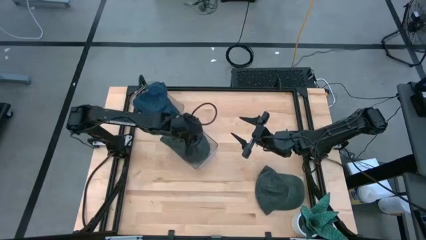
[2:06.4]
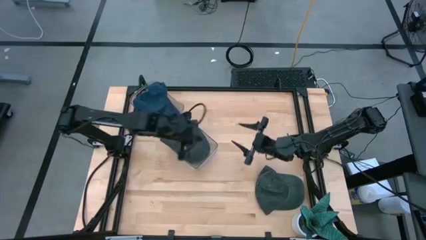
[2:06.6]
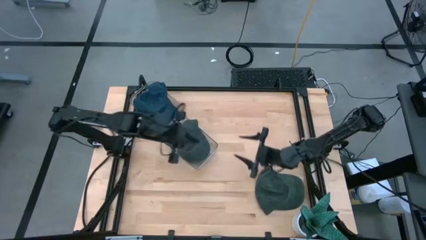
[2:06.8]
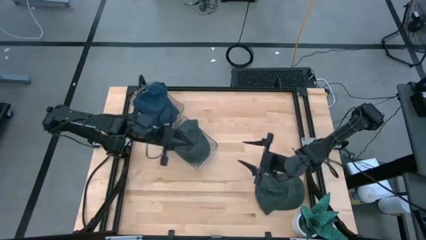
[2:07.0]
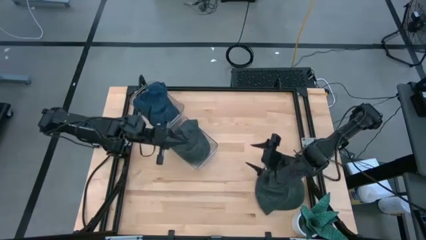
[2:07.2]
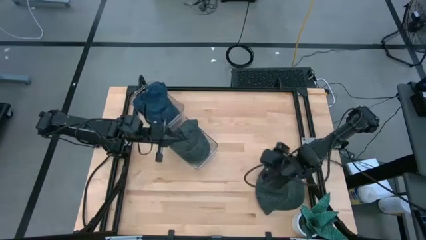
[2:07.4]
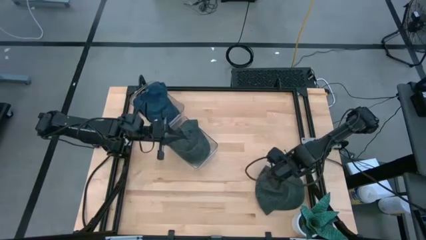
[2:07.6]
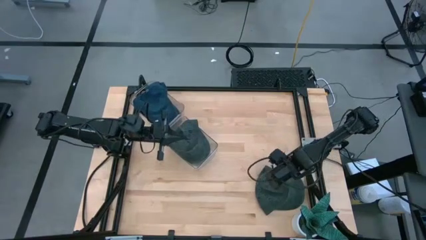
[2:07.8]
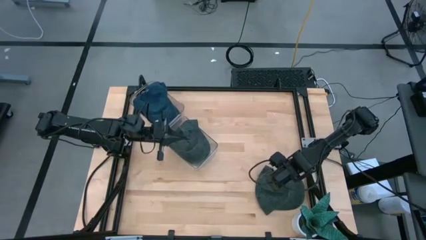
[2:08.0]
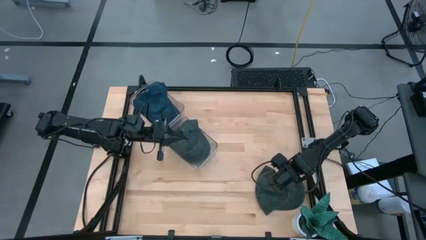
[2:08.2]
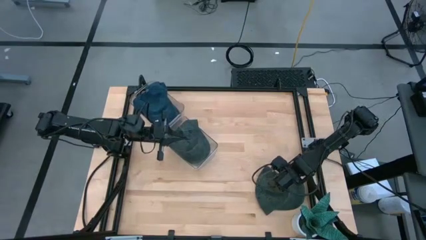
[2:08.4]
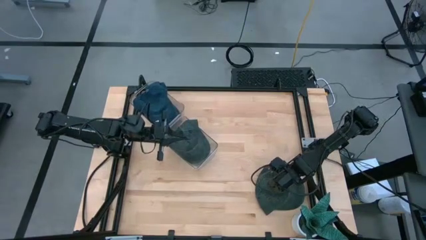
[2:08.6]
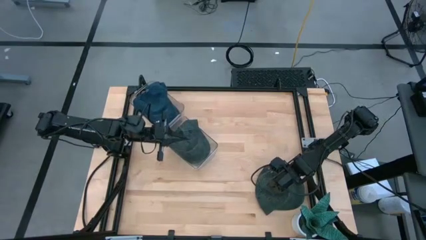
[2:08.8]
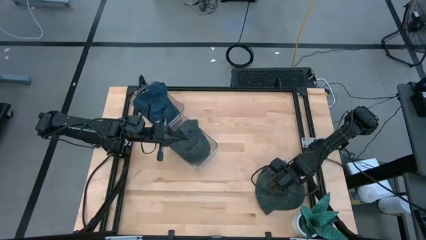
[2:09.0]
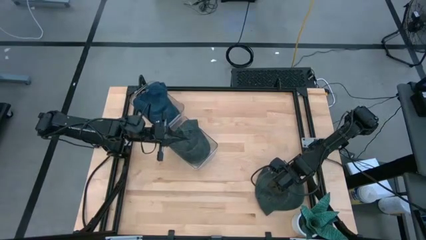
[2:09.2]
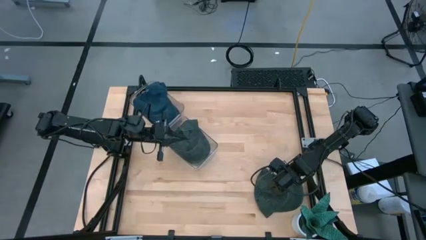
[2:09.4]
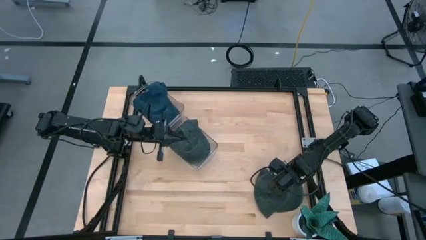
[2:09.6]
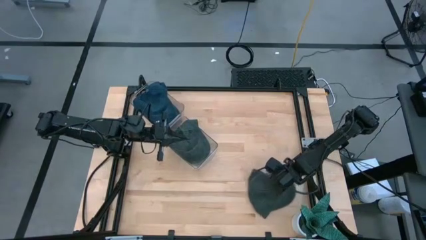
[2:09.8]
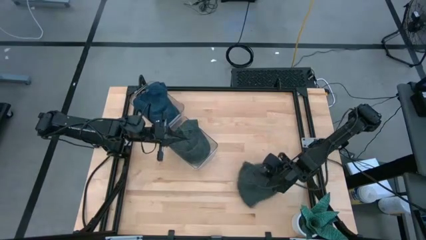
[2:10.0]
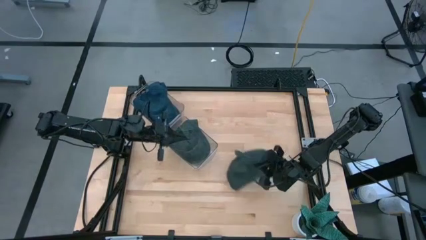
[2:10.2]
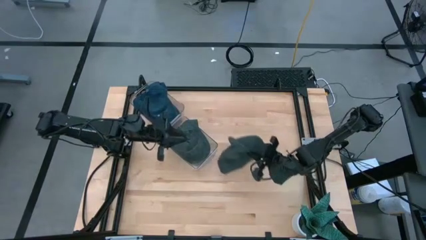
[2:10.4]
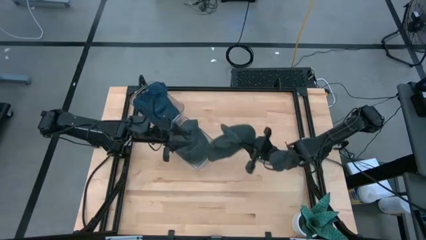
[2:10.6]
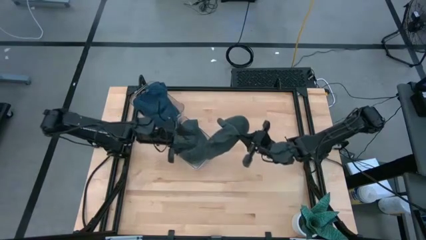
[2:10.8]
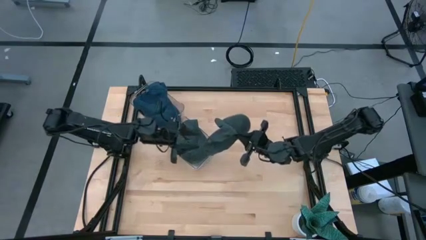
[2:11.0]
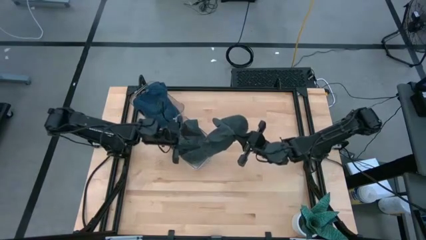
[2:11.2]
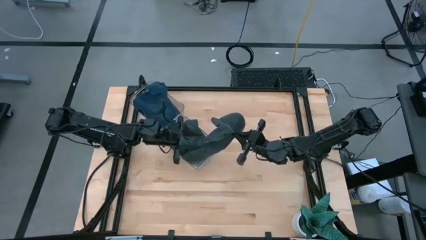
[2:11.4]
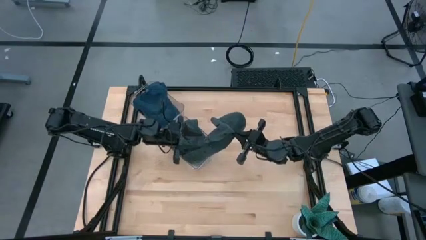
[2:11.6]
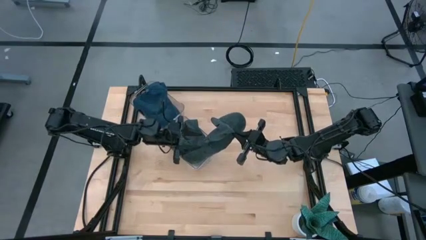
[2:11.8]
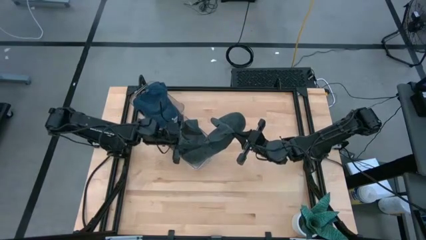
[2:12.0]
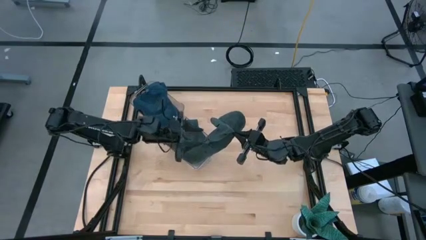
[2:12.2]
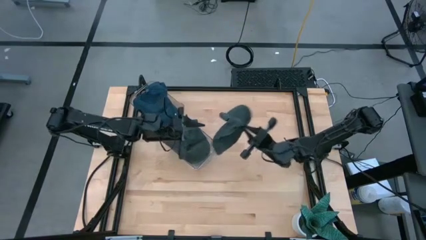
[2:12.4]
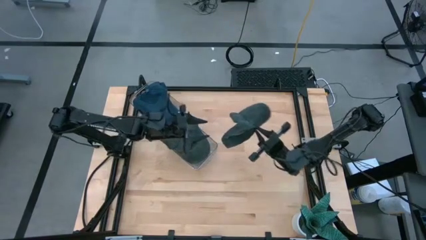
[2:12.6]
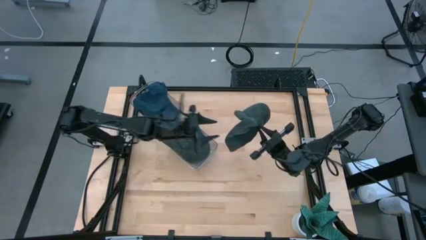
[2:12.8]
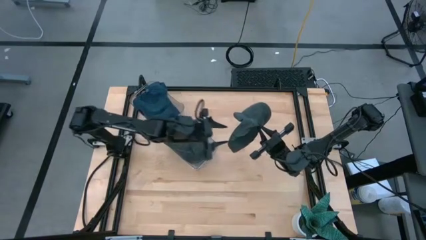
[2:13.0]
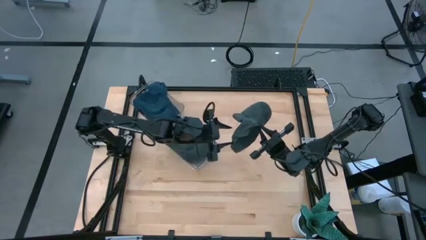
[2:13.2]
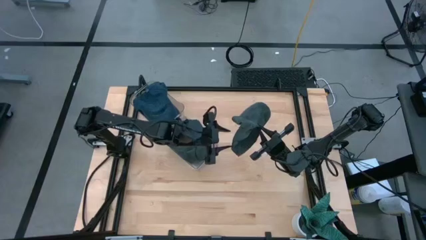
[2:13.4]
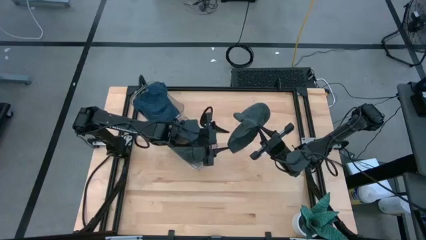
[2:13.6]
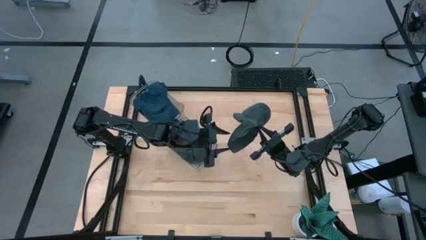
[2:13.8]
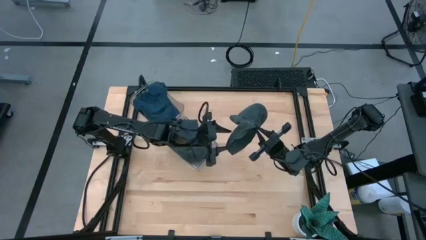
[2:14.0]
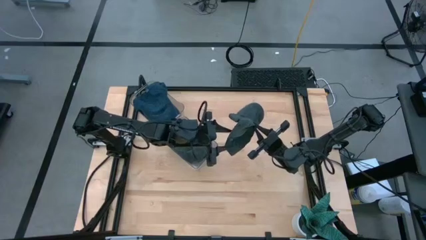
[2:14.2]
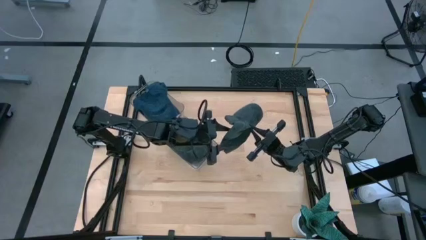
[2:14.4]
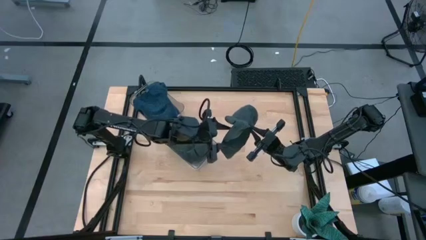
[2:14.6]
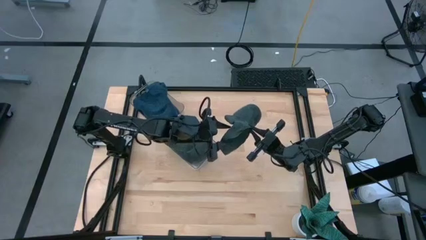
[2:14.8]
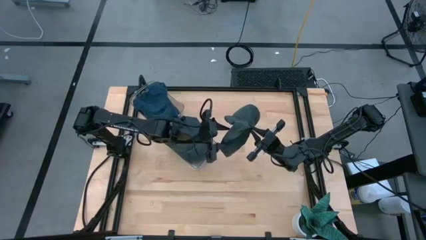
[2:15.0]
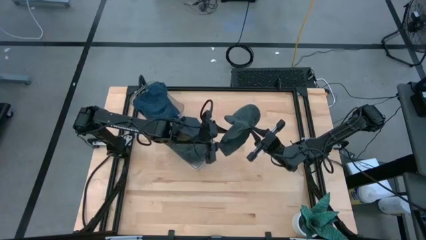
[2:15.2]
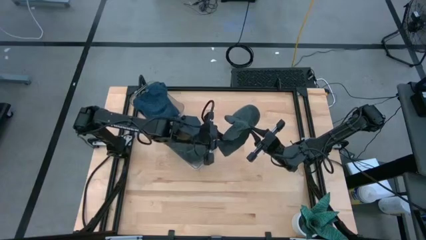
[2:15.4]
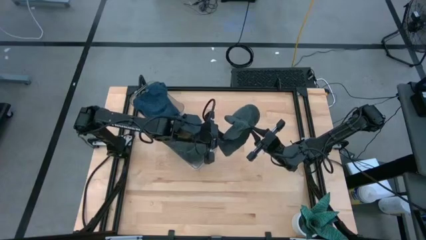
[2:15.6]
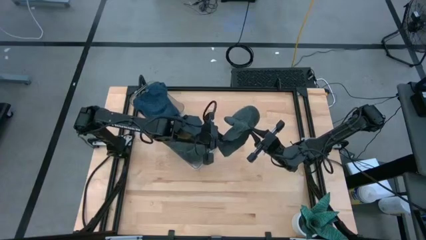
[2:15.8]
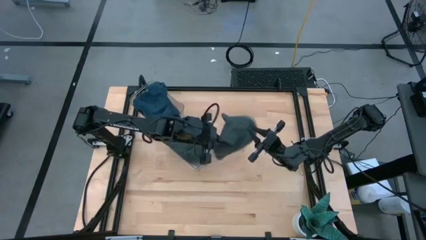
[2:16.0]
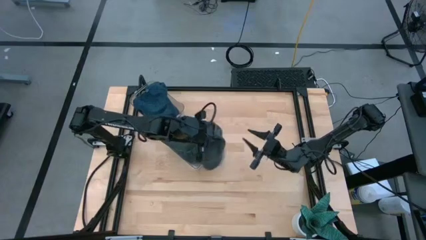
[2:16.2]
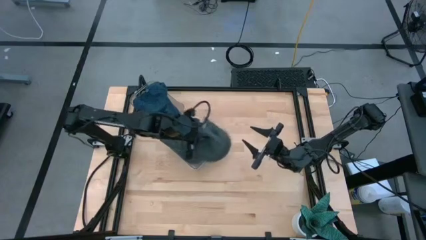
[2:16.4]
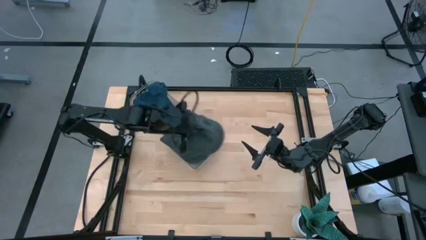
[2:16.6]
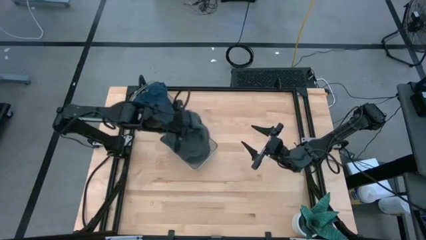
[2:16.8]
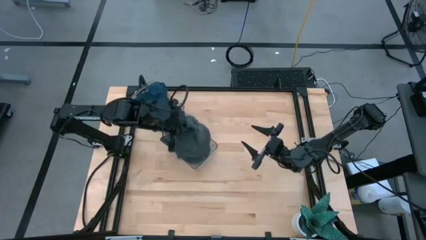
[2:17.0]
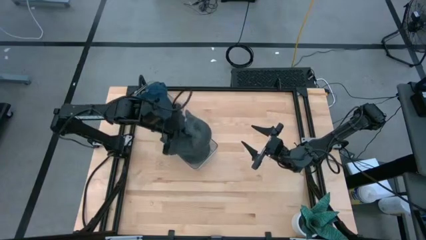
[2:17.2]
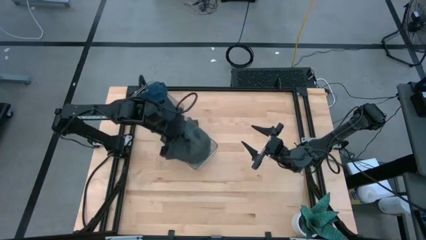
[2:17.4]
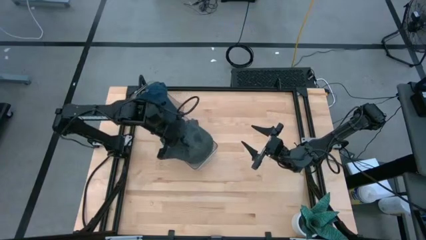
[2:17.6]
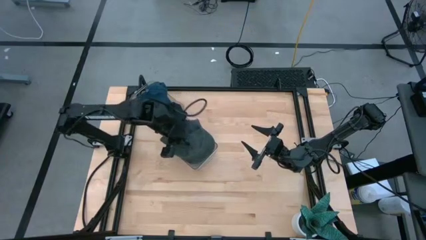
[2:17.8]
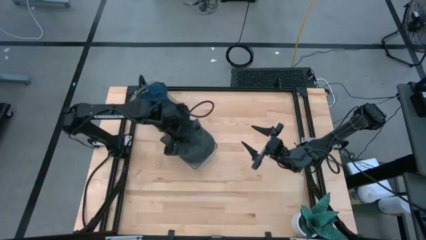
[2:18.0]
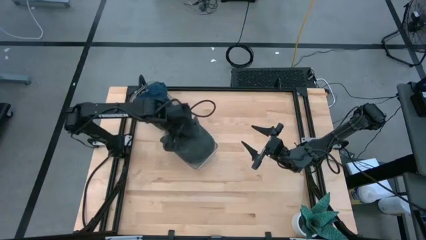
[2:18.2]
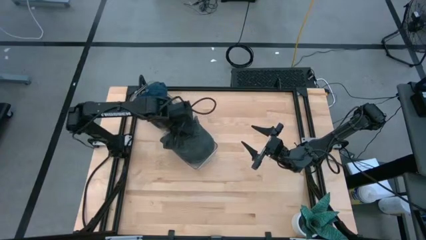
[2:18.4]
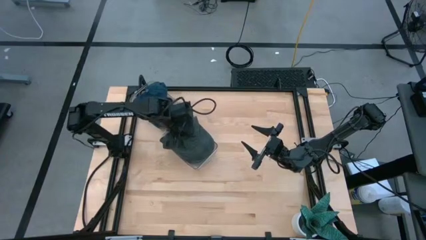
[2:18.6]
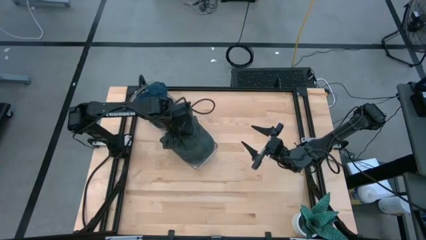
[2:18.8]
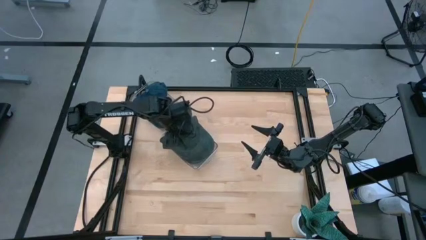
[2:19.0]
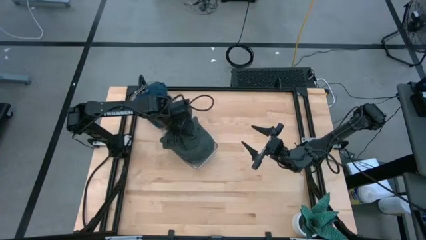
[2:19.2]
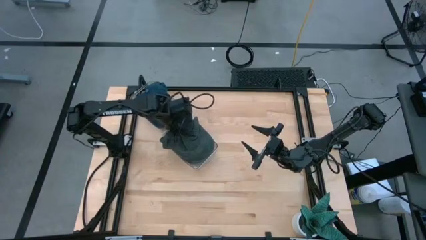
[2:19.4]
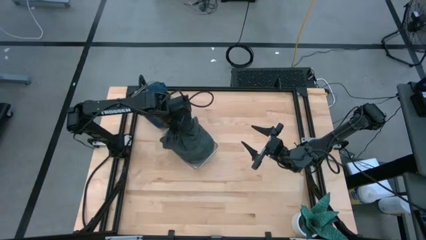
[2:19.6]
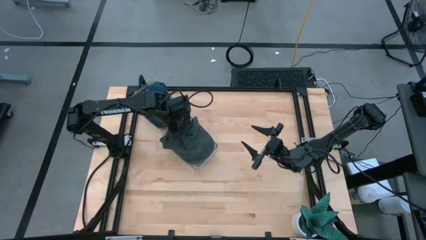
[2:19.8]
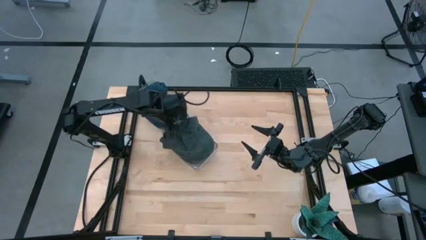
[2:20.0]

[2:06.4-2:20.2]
Task: Pick & Place hat
Put the black cap into the bottom transparent bin

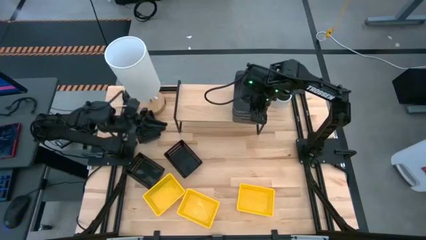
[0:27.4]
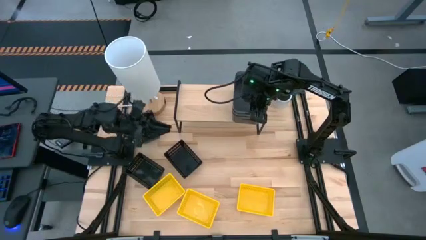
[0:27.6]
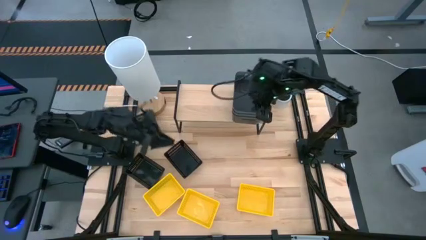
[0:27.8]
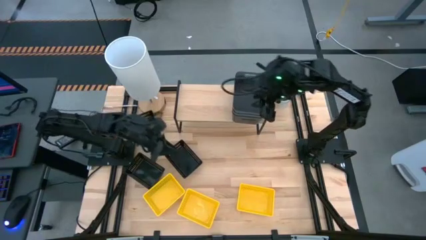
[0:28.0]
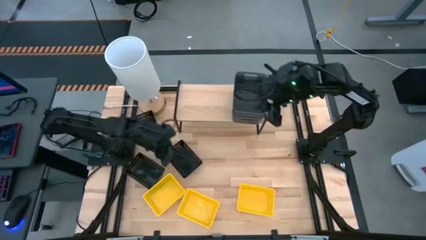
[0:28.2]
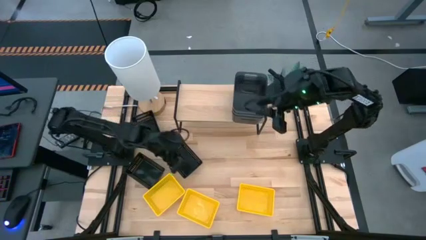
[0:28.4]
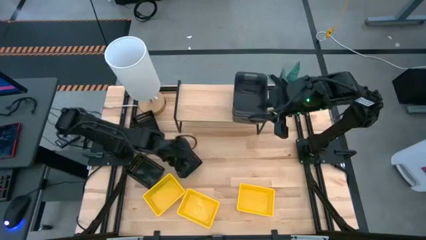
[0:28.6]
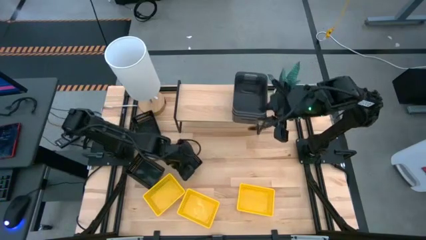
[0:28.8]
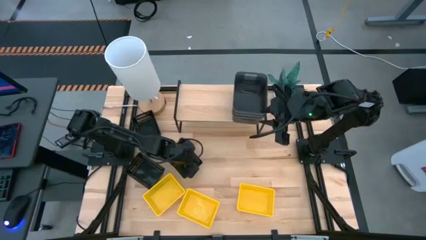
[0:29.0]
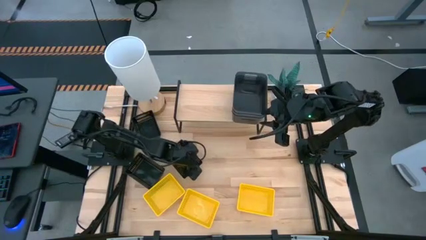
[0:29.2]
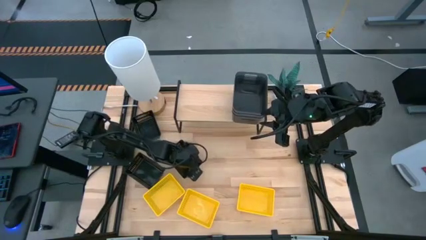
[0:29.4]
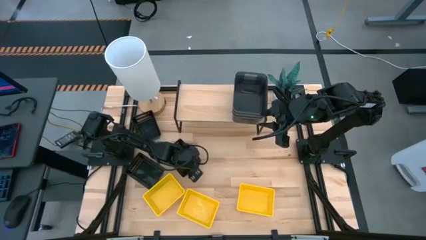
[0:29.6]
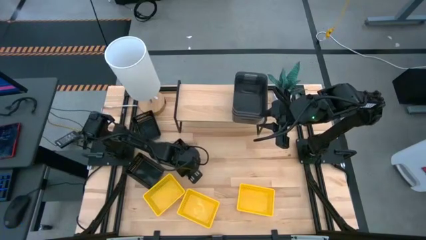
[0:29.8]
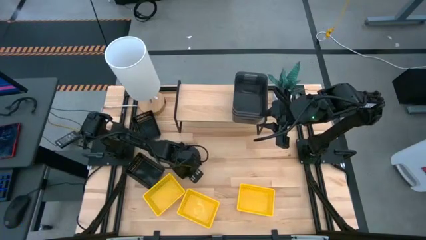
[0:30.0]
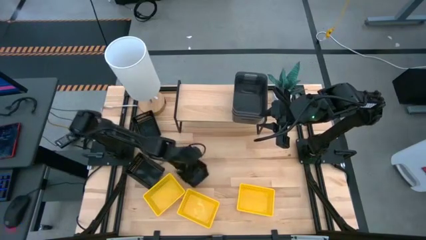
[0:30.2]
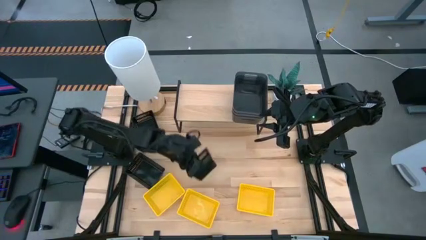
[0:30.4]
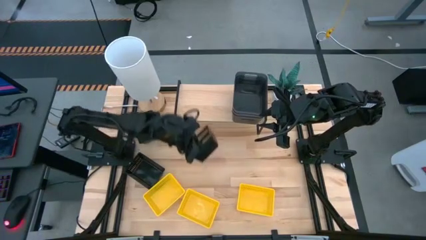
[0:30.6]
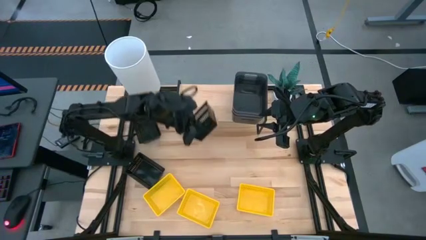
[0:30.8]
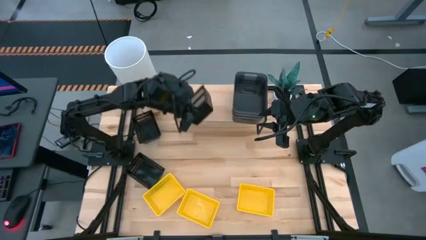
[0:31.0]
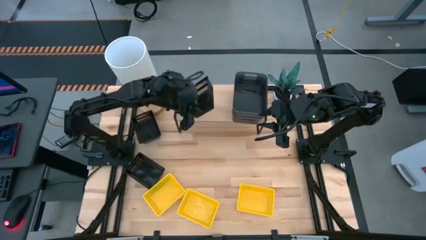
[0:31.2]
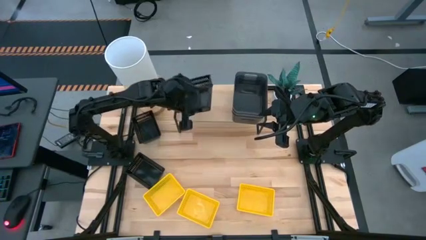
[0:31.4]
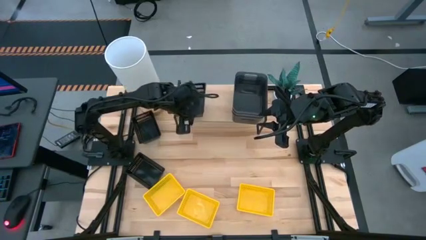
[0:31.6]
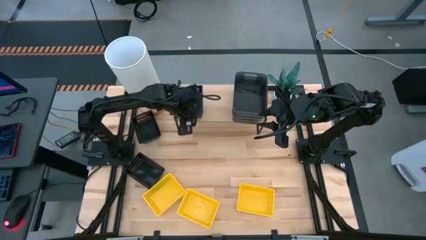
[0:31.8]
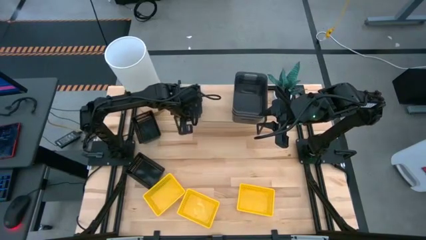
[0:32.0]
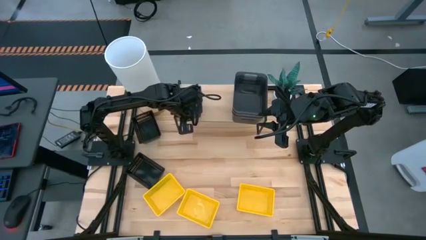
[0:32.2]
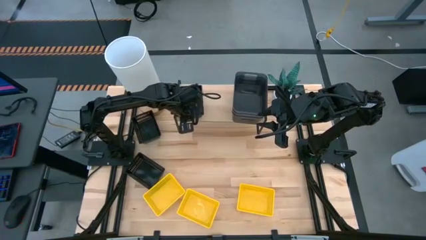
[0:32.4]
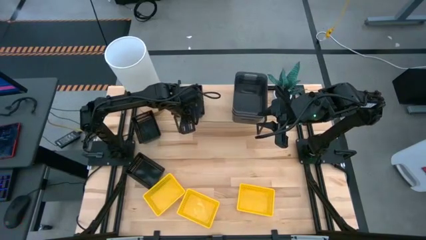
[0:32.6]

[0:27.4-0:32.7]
Task: Stack baskets on shelf by color
Put the bottom right black basket on the shelf
